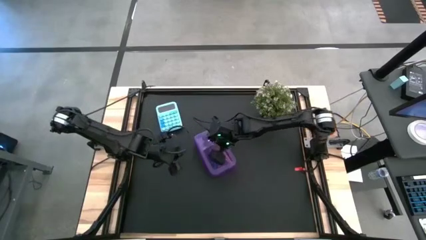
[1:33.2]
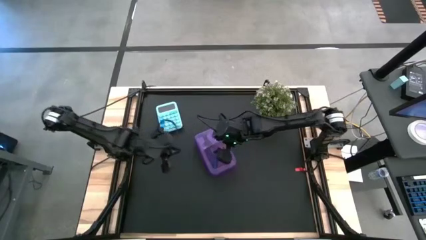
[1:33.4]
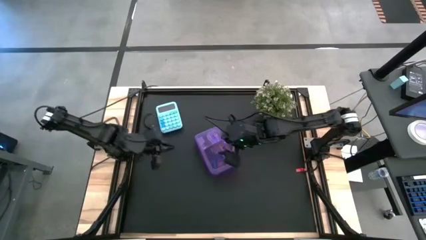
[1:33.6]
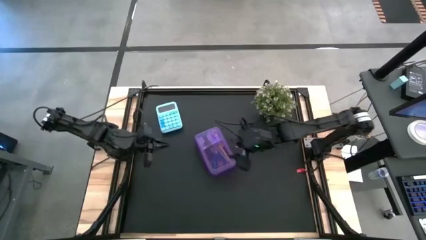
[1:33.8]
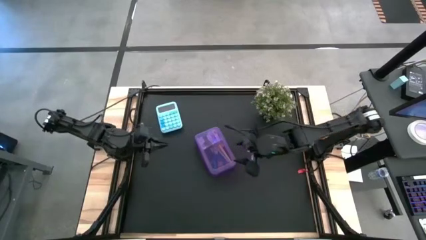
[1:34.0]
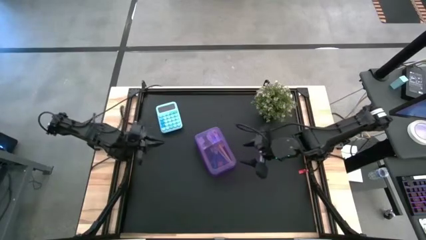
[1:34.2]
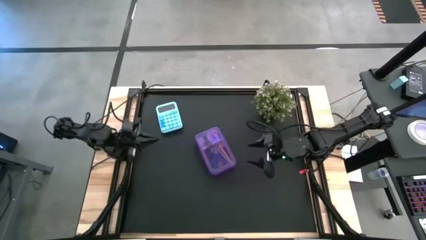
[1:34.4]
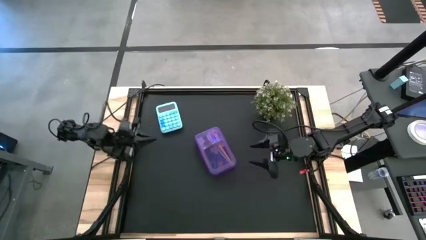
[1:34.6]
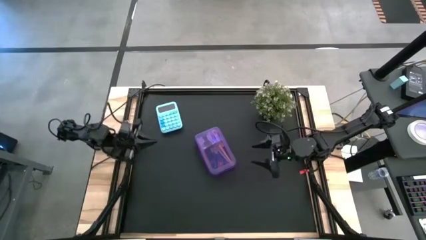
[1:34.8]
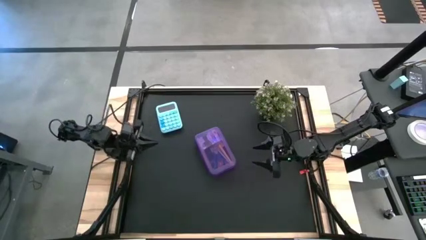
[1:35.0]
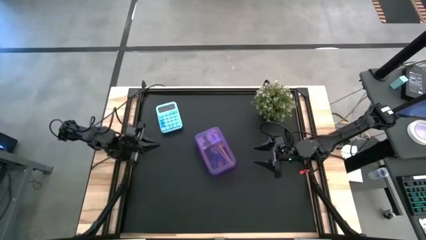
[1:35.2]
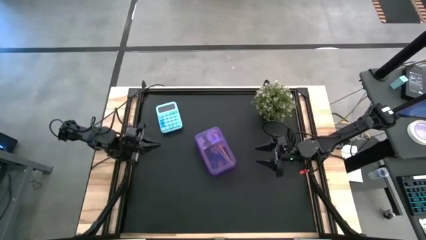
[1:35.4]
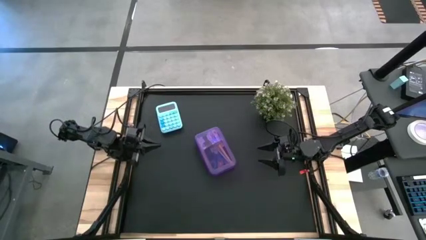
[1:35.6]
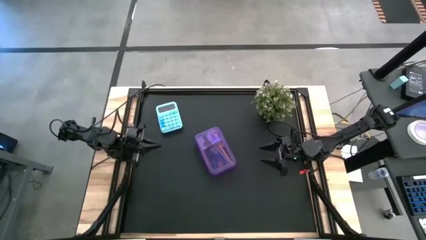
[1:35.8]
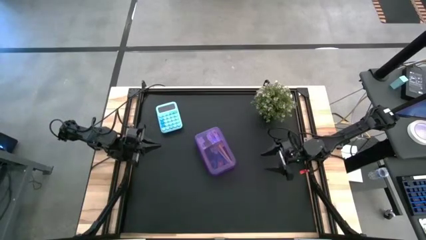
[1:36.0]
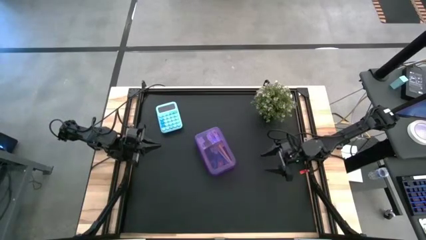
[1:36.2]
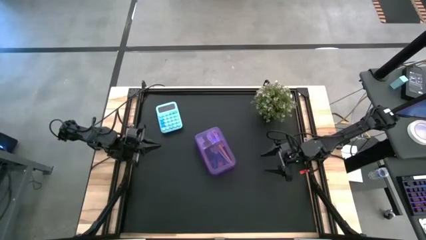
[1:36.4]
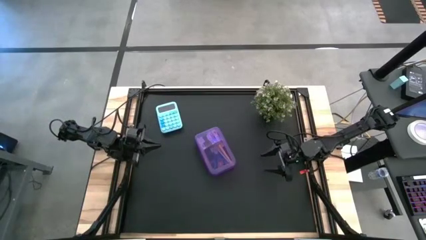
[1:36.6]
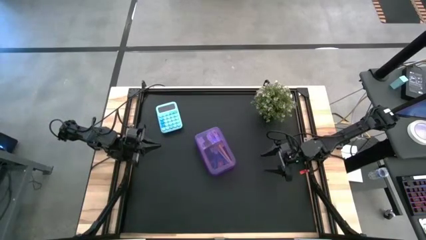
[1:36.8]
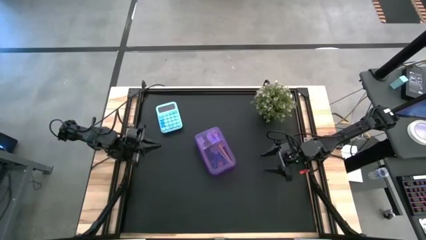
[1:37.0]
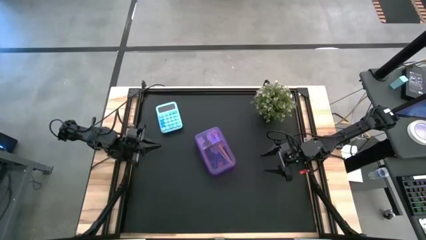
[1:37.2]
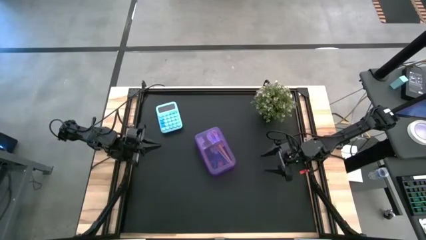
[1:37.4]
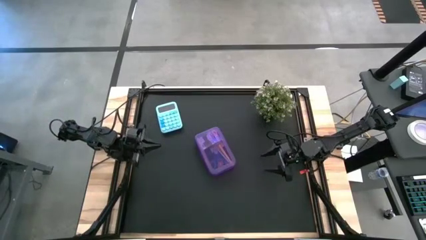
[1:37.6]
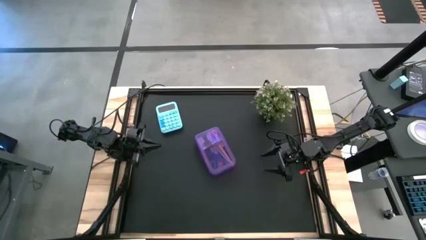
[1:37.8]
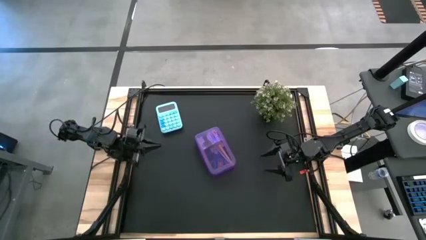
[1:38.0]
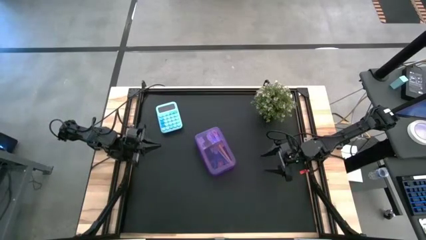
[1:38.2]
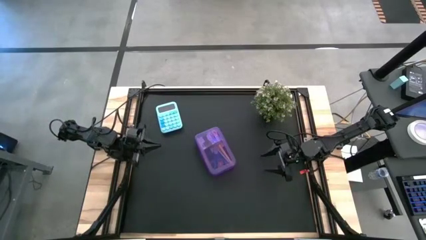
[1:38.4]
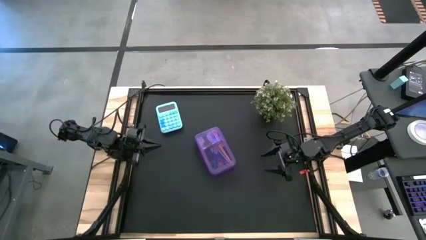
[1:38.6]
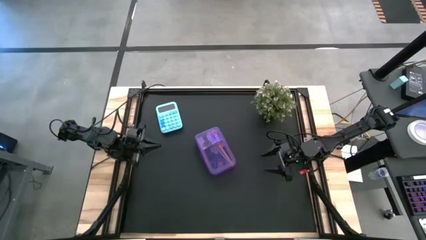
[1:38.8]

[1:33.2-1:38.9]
Task: Pack school essentials
Return to Home Position

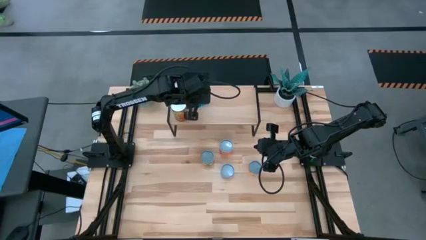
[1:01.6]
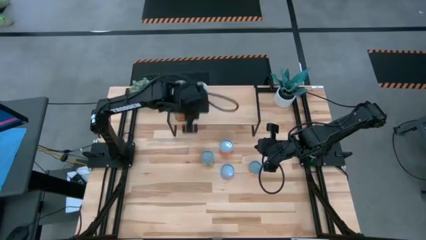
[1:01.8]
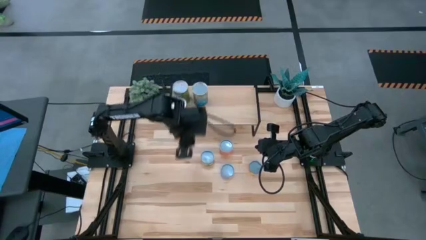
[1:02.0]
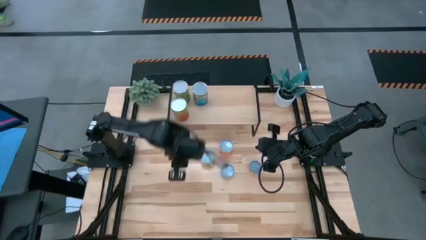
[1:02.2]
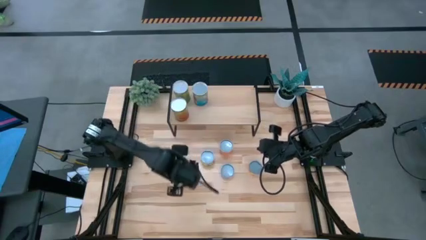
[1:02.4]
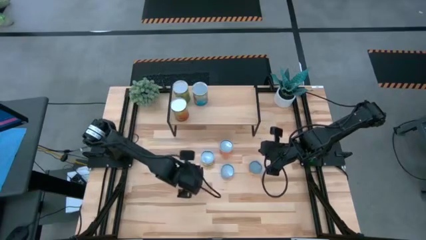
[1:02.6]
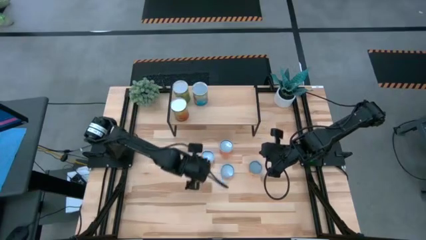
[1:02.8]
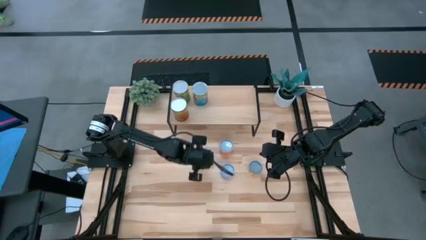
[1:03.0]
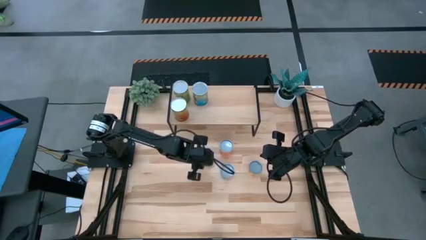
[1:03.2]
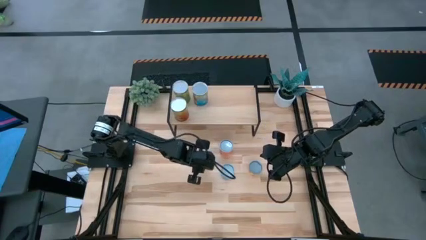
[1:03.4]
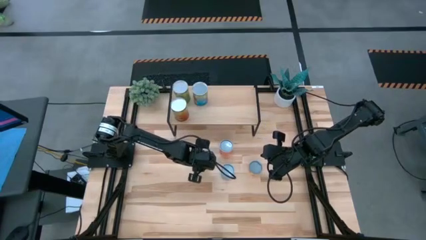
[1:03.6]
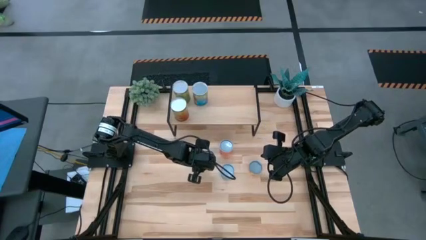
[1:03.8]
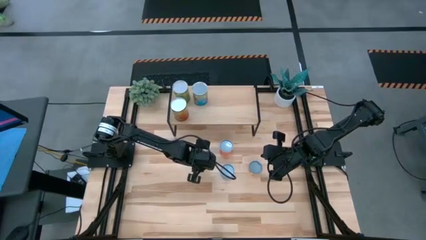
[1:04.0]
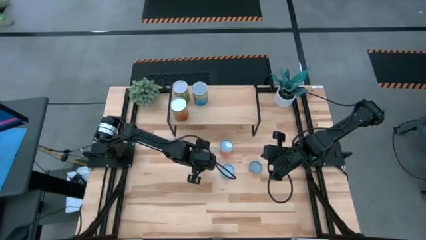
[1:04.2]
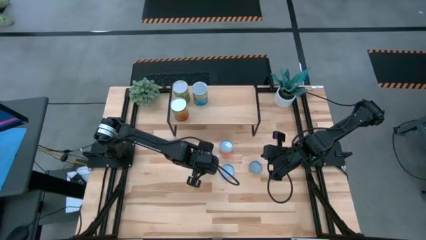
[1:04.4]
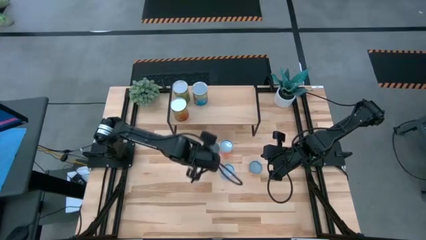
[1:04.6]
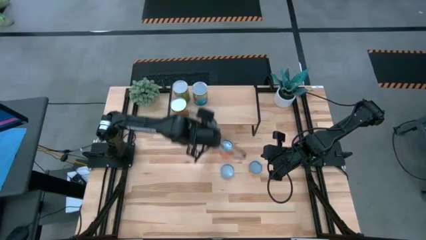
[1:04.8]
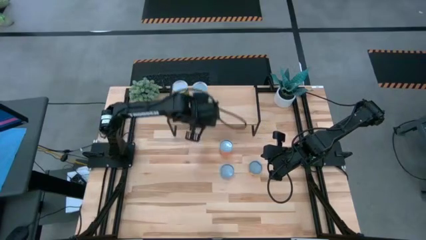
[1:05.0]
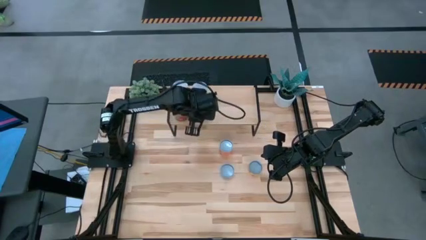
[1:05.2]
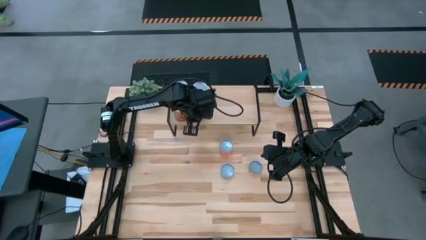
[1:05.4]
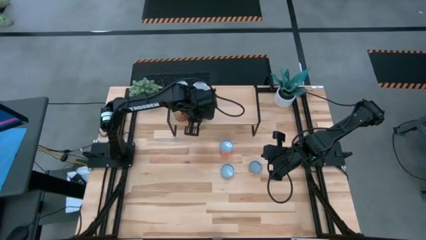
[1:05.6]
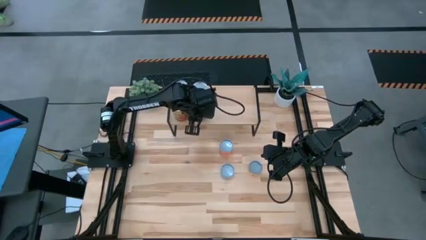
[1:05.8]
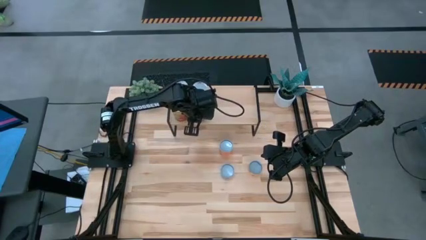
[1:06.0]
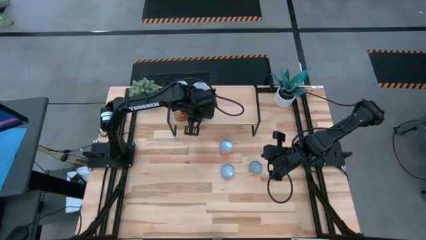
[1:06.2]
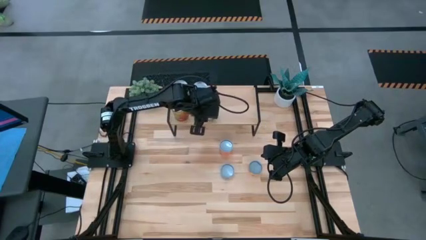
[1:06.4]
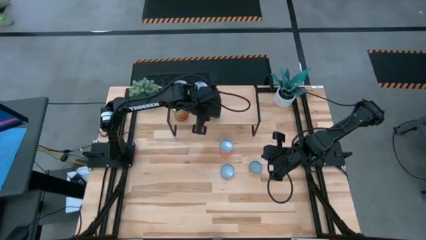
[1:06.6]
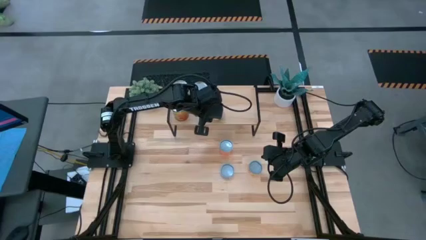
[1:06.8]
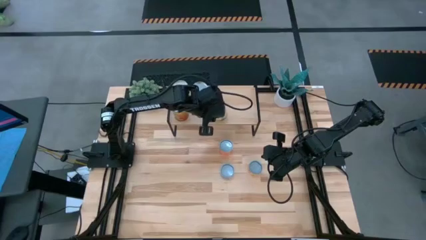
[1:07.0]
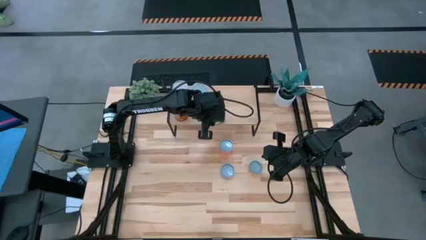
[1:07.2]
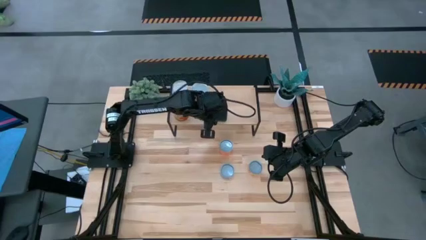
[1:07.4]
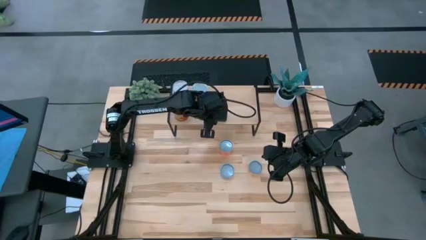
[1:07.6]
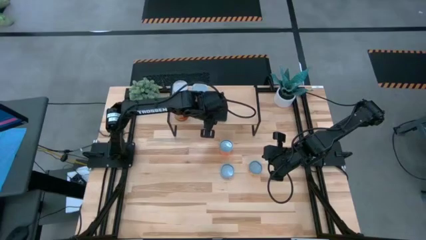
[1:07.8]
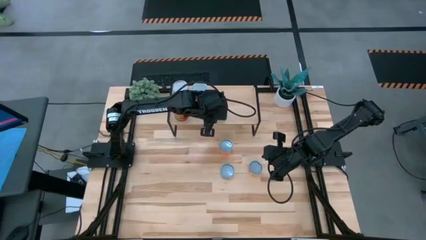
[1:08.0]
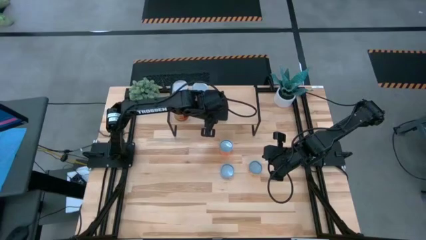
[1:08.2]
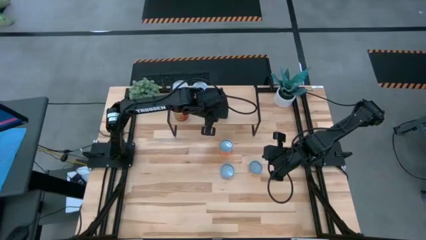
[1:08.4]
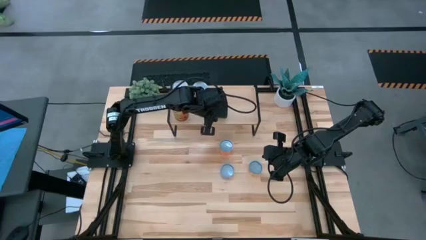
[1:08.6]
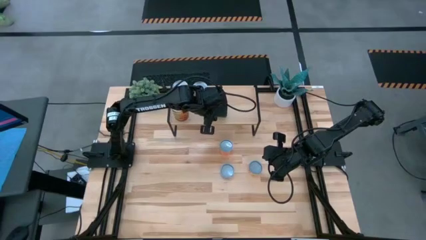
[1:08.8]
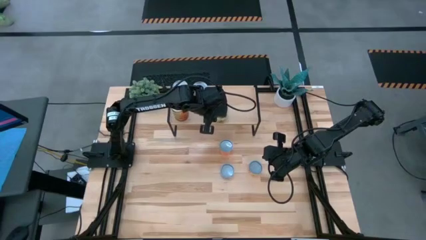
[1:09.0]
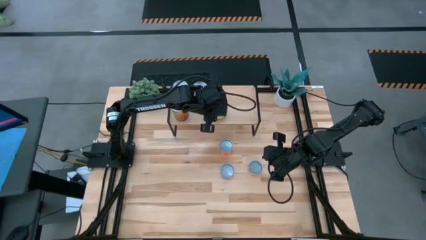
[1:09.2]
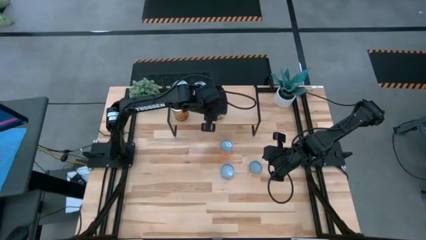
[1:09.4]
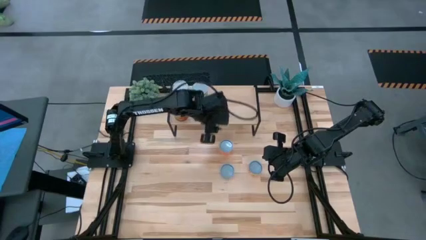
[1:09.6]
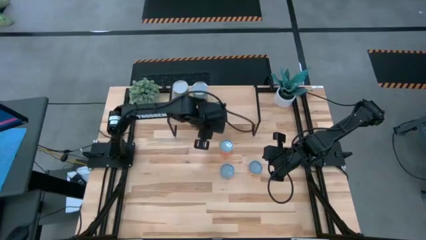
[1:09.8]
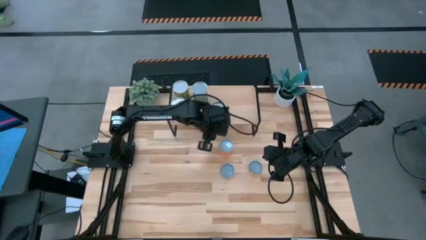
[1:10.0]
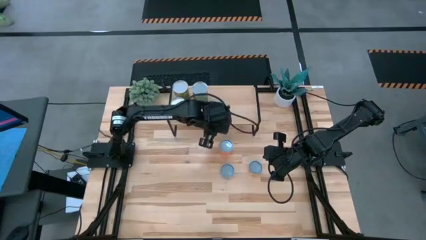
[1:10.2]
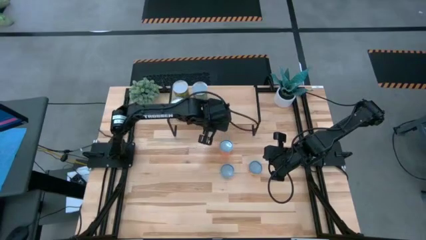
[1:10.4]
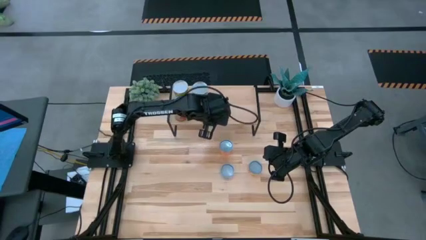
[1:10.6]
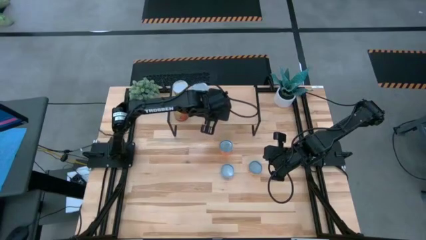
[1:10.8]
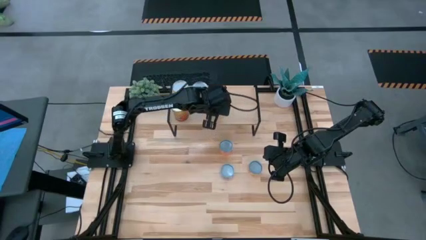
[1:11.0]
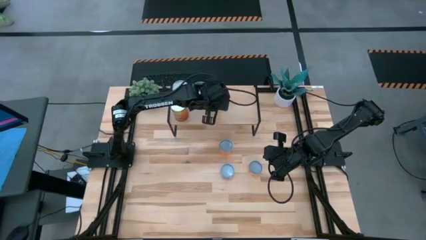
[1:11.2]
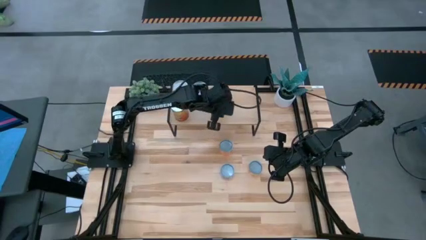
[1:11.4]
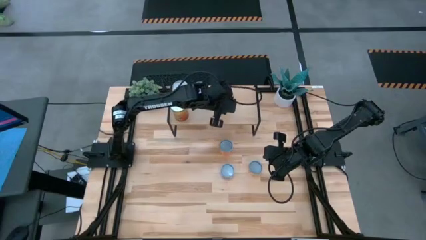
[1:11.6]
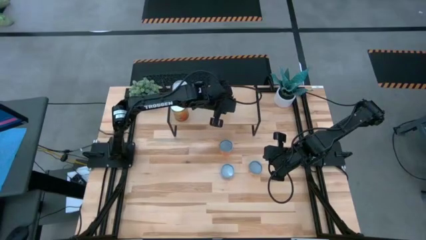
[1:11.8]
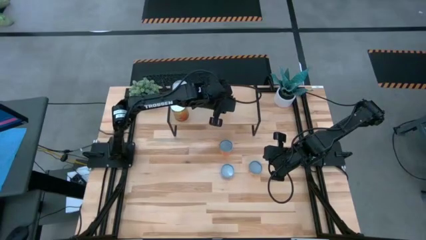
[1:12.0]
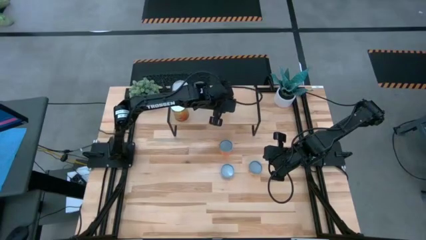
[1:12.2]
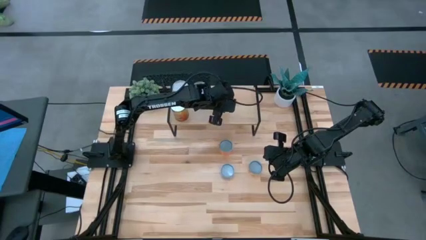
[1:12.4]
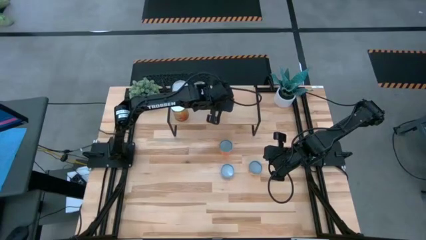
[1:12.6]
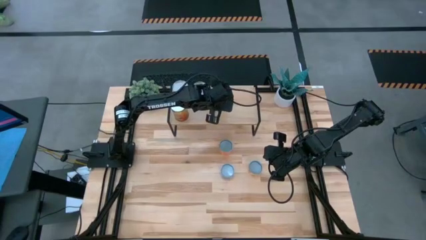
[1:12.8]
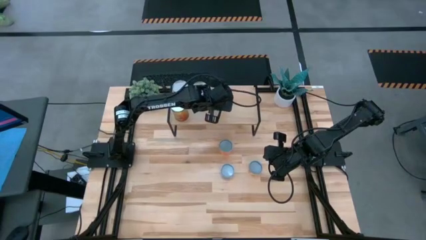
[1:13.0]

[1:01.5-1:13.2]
Task: Pick and place cans onto a shelf
Put the canned peaches on the shelf
